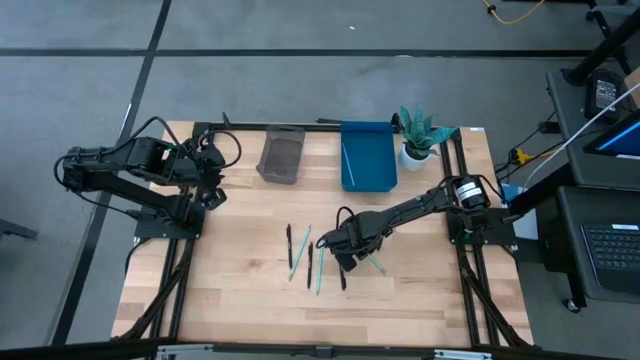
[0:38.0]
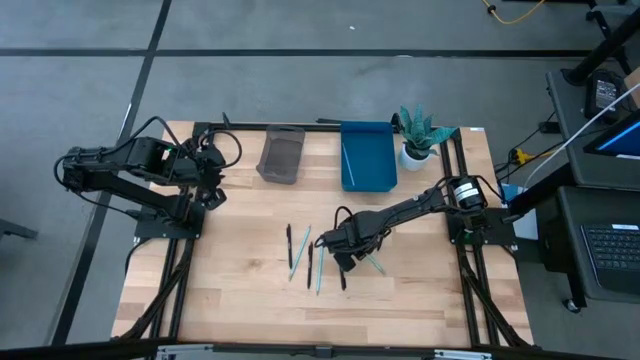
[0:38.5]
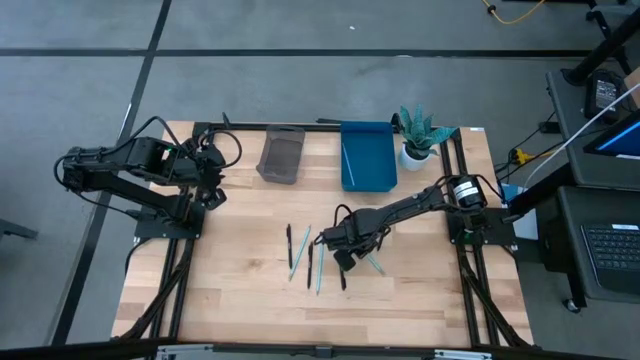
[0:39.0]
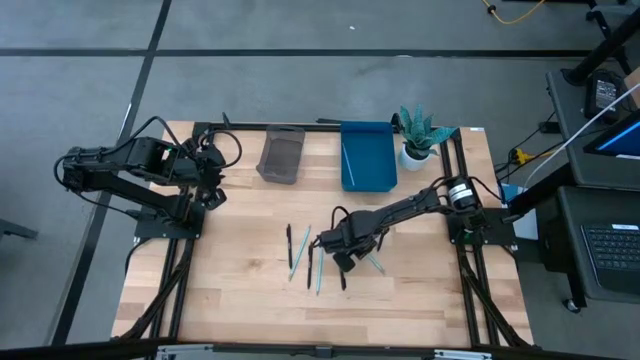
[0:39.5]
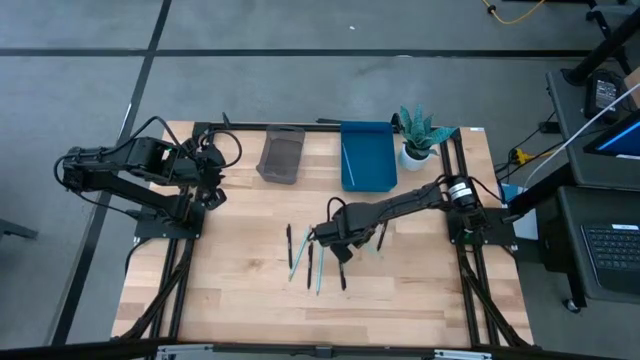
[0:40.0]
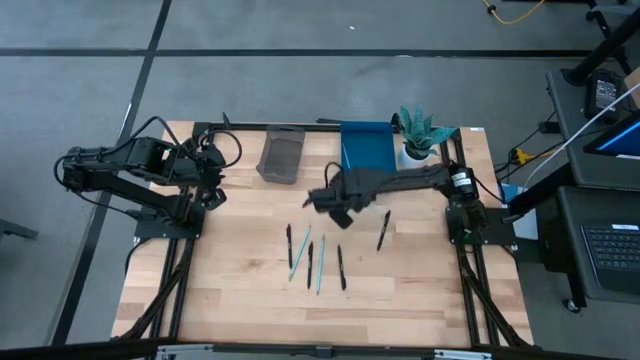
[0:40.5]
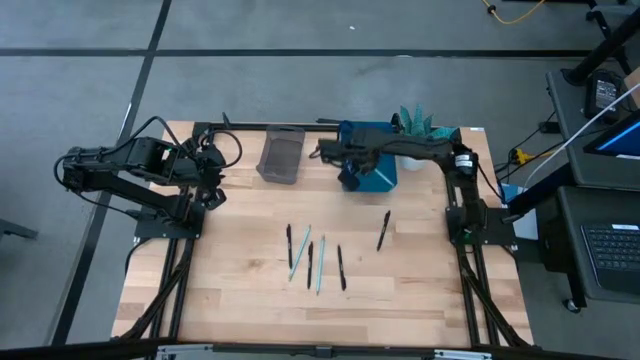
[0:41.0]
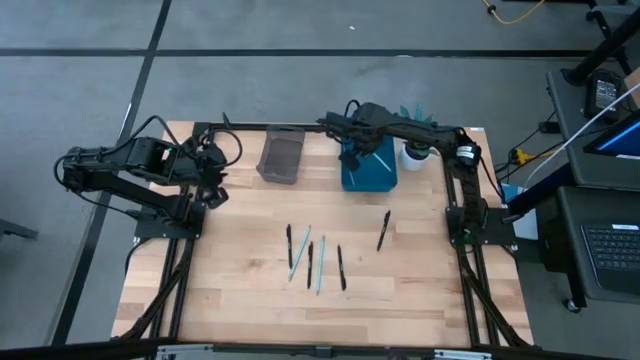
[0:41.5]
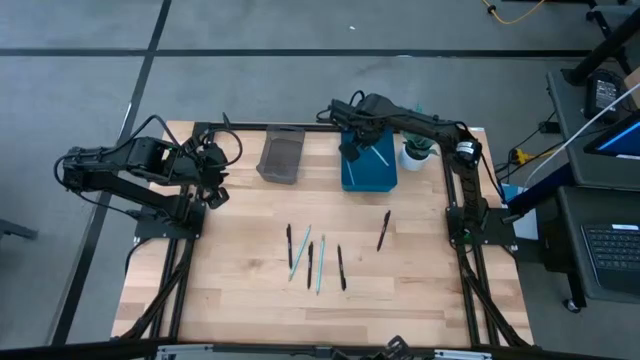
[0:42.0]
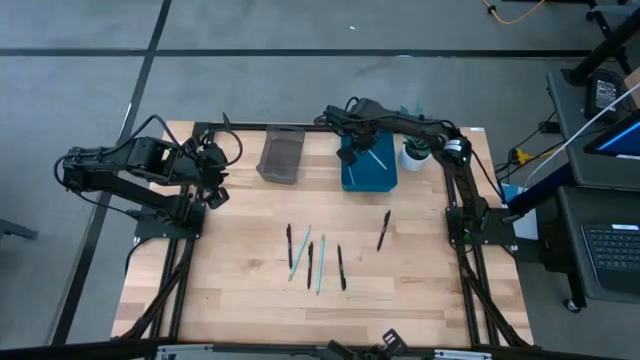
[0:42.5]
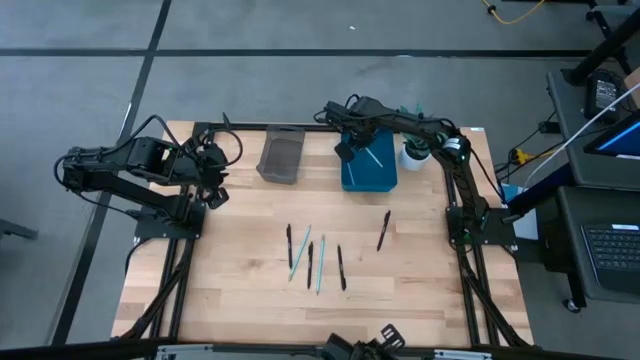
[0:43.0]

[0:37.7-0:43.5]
Task: Sort pens & pencils
Put the right light blue pencil into the blue bin

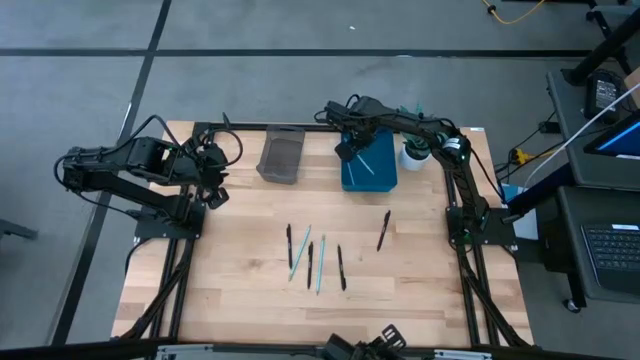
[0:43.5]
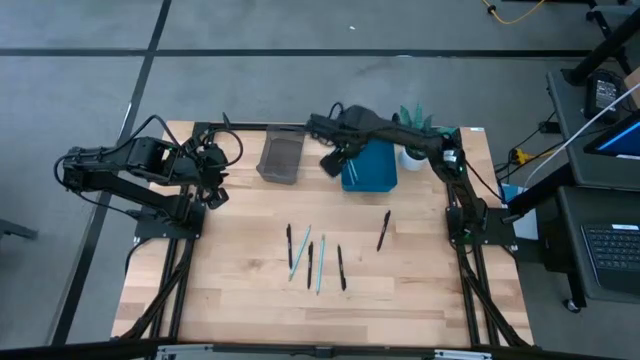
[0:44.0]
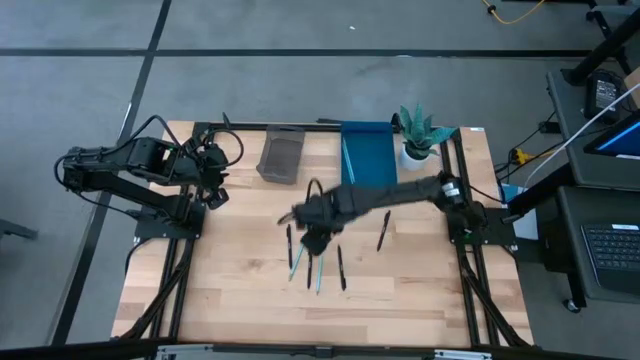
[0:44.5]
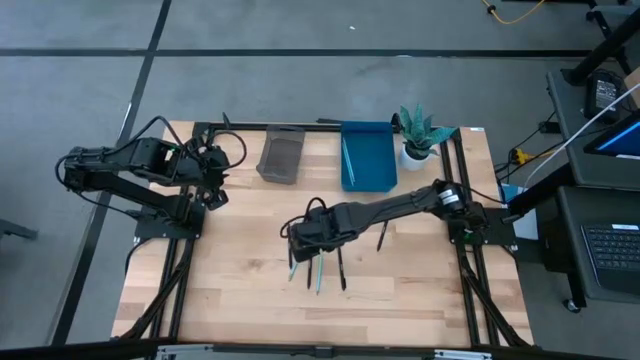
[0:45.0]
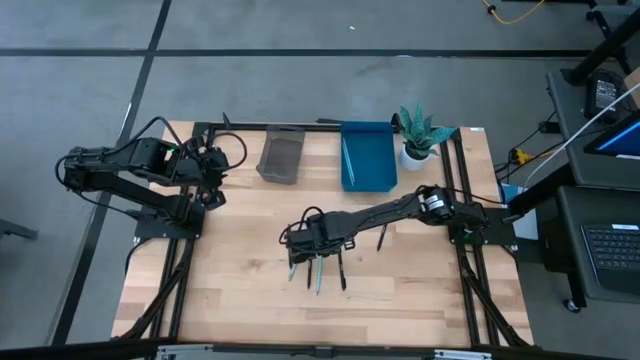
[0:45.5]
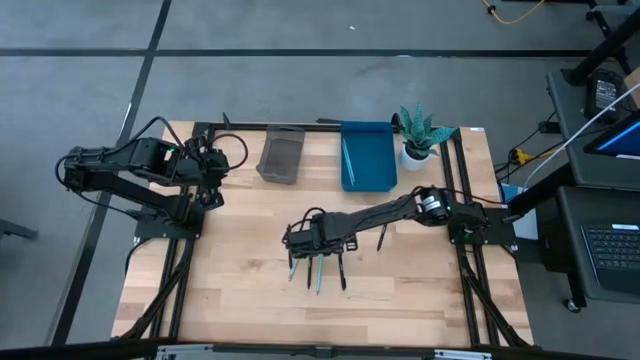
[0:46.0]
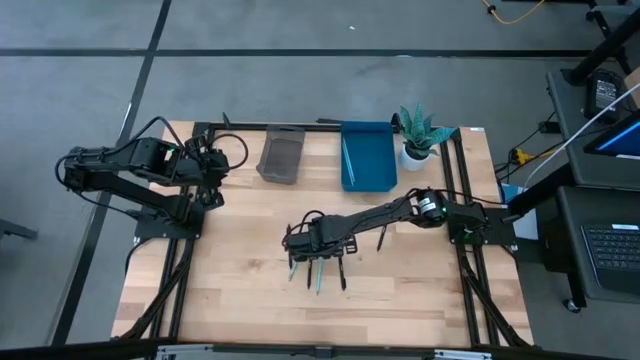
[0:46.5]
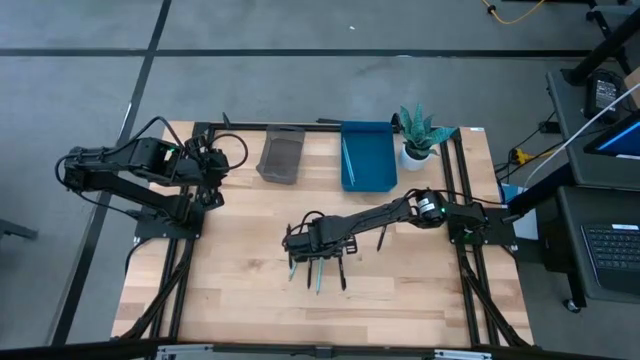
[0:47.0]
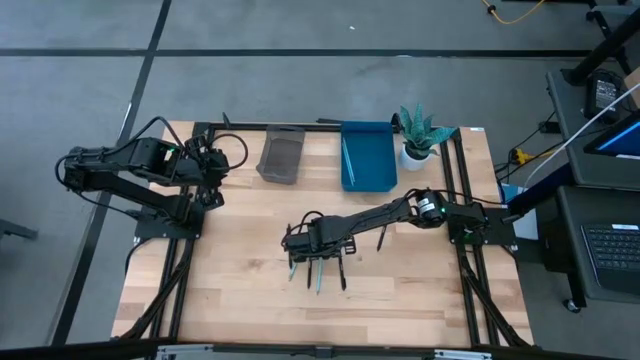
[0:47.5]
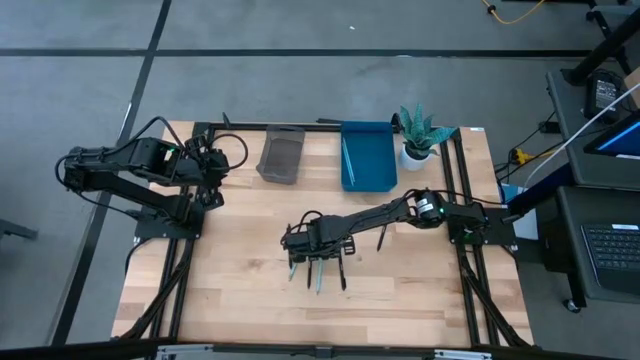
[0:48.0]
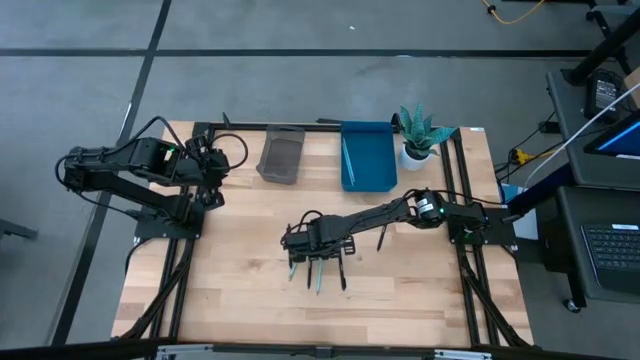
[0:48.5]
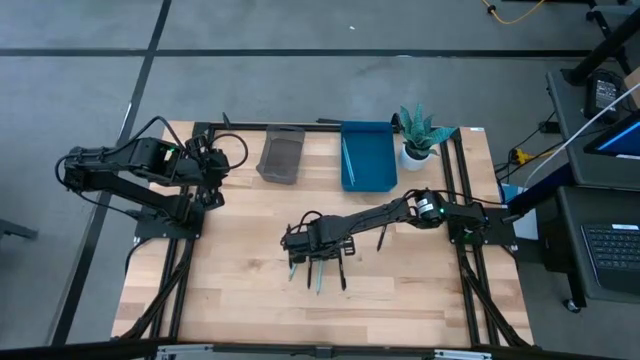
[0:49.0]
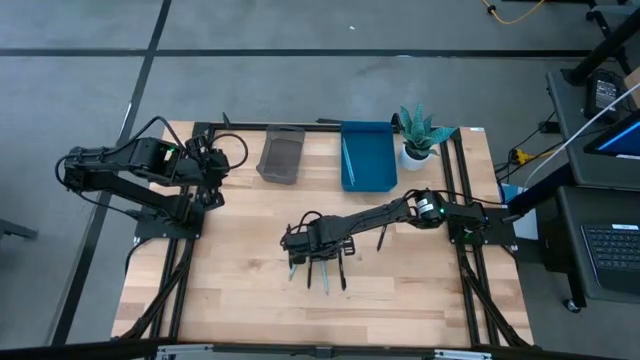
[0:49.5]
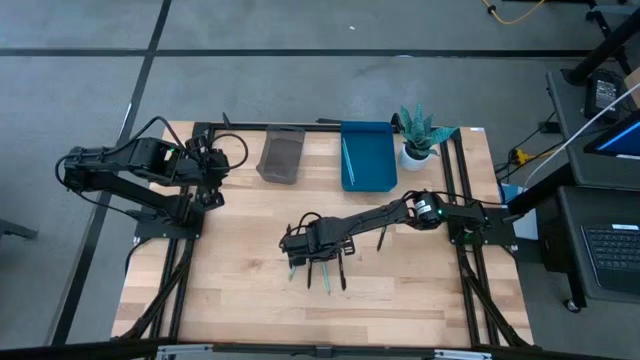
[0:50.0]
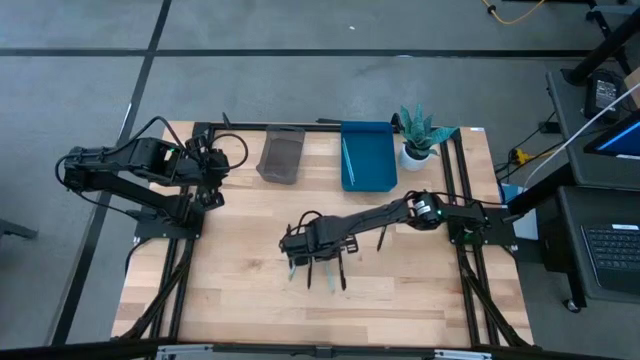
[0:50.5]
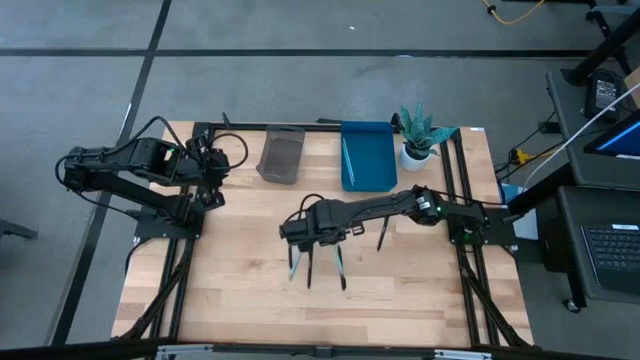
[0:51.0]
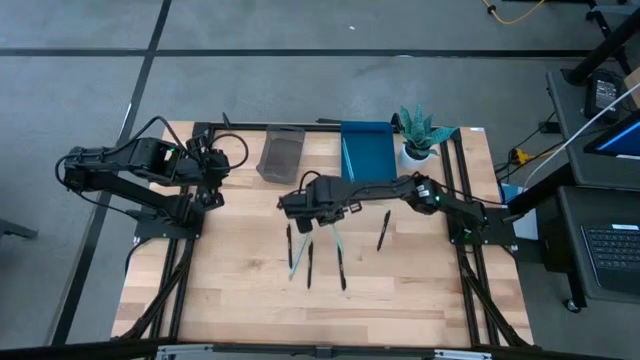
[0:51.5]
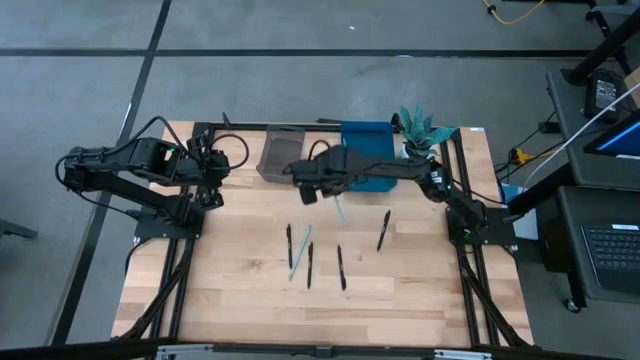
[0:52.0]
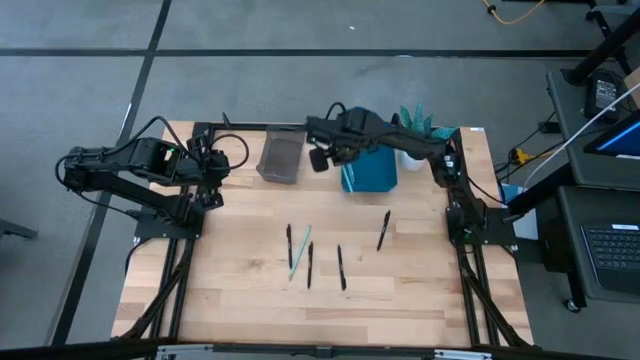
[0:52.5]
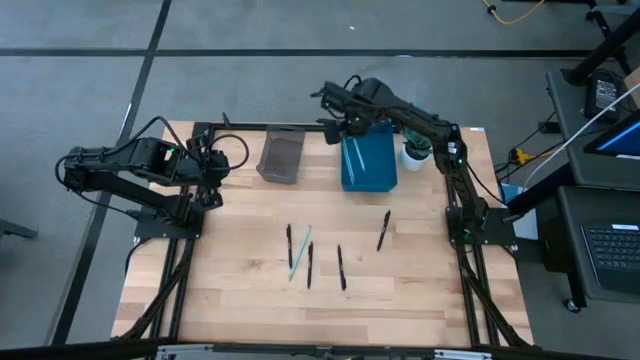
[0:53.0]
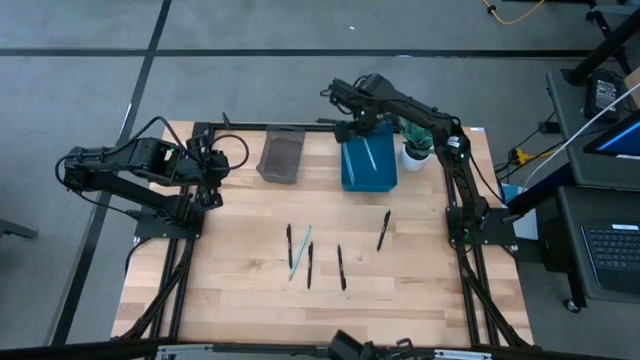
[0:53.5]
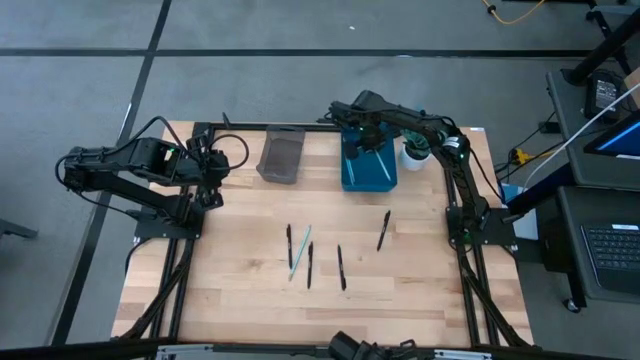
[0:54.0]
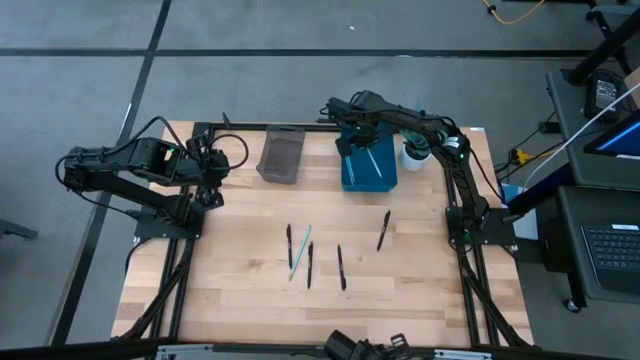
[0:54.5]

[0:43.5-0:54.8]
Put the right light blue pencil into the blue bin
